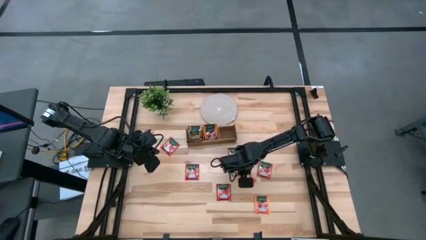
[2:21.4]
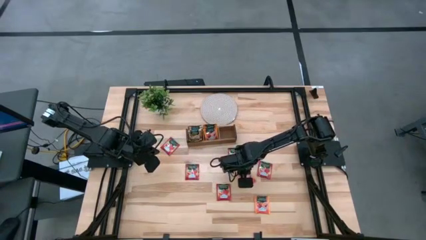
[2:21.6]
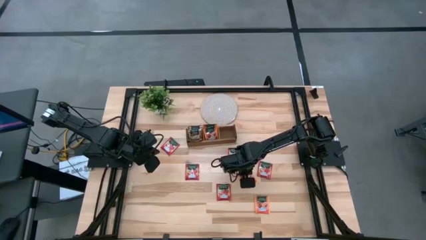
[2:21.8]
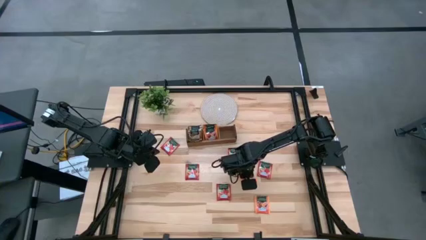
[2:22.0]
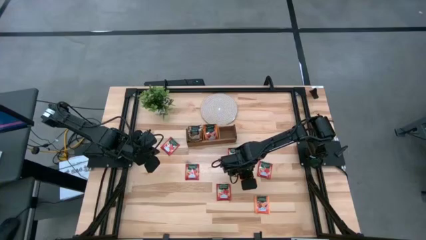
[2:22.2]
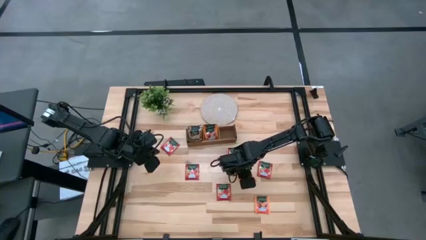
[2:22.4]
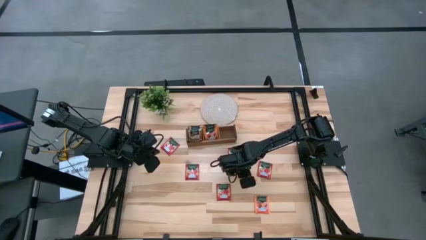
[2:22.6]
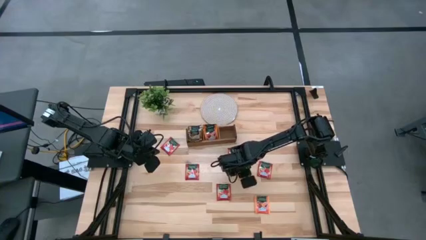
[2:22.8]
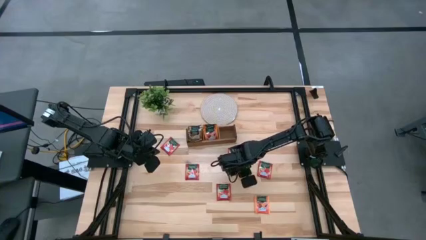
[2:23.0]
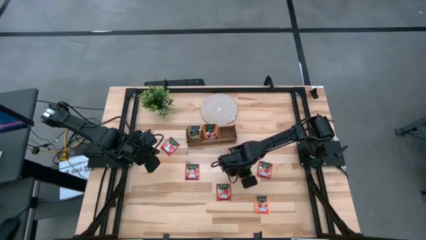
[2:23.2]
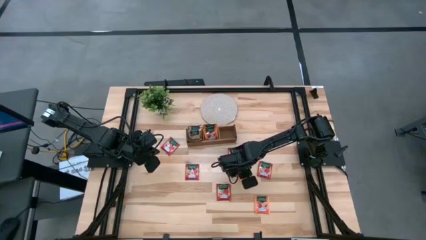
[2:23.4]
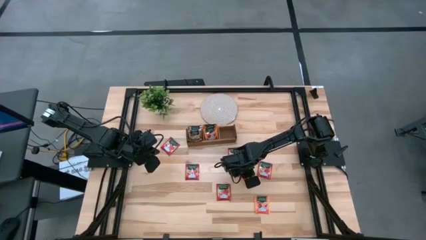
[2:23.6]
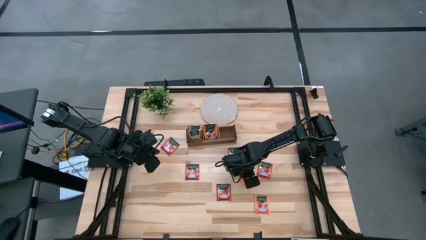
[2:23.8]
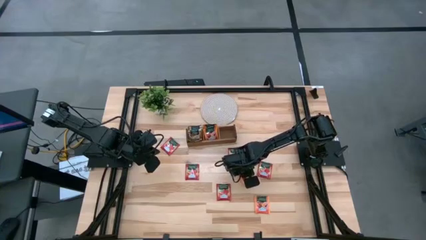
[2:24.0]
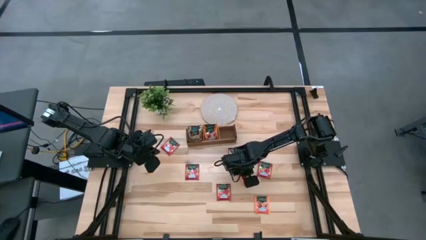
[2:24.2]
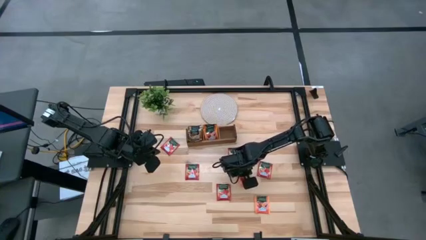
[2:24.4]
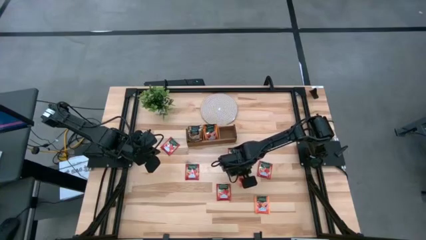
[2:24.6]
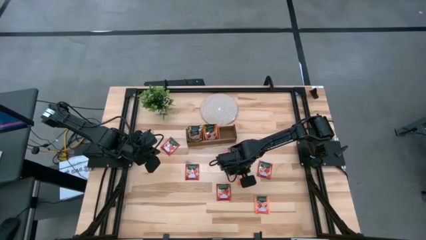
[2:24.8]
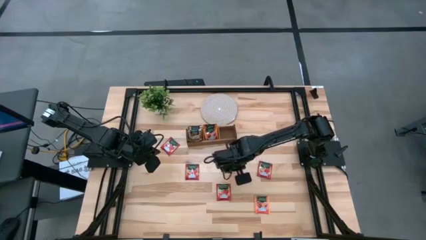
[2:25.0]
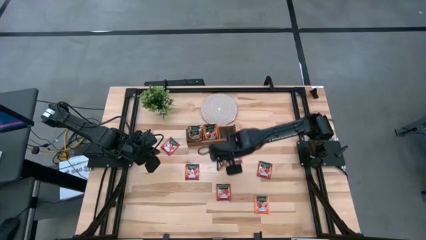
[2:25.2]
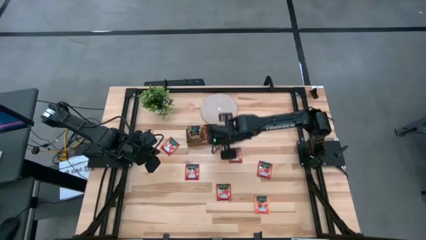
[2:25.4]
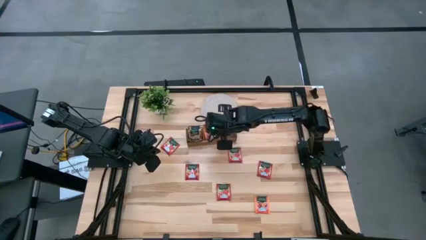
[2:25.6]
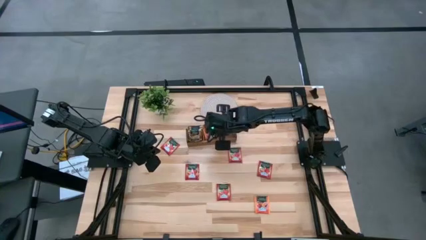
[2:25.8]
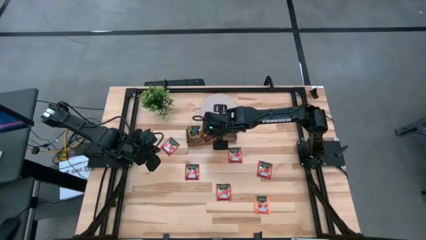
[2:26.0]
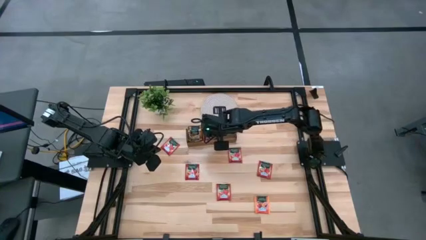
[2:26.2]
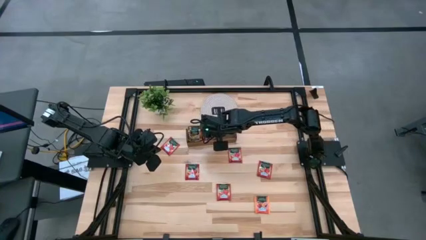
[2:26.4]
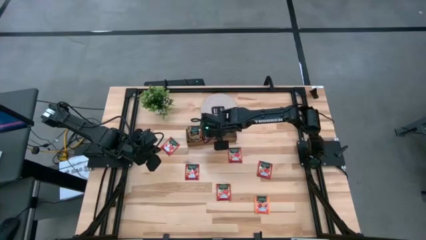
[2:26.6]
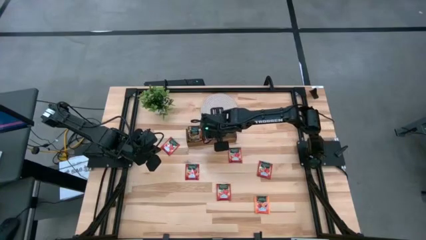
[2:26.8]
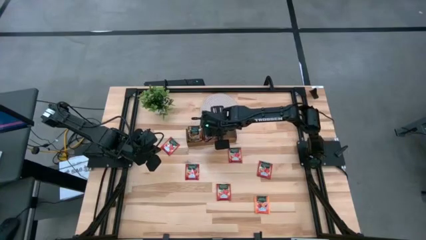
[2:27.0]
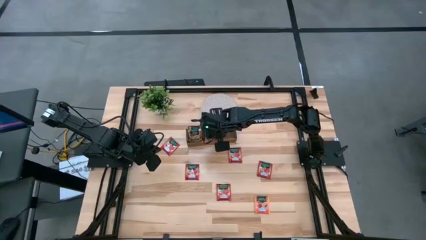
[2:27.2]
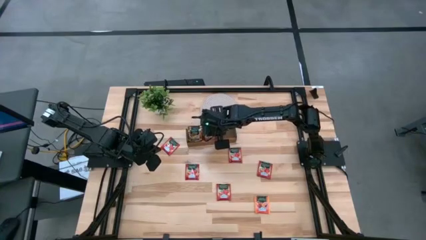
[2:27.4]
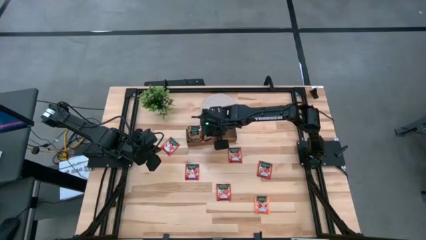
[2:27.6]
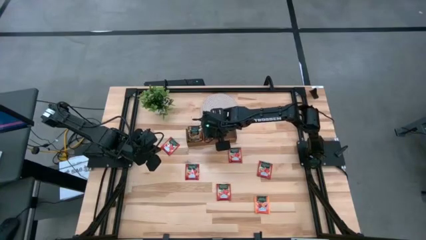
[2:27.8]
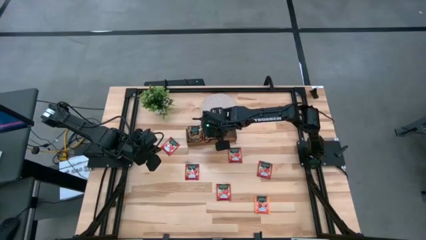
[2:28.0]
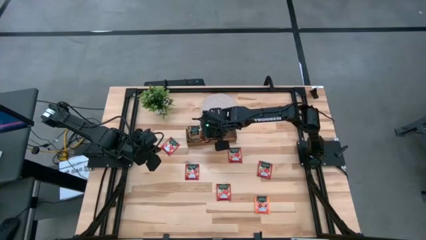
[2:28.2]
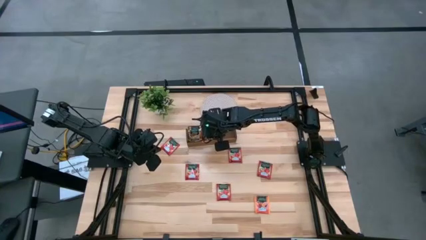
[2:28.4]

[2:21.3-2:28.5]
Task: Pick & Place Tea
Put the orange tea bag into the middle of the wooden organizer

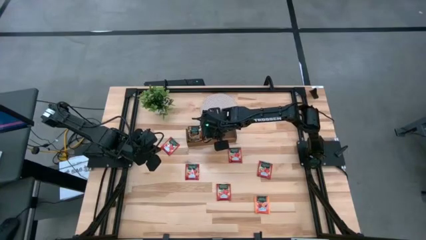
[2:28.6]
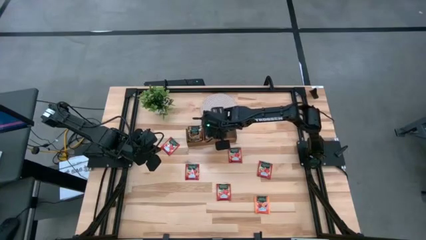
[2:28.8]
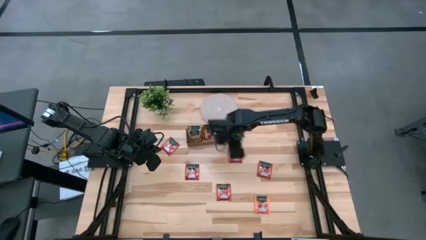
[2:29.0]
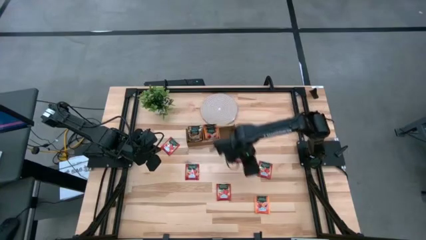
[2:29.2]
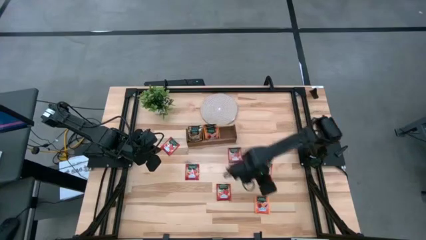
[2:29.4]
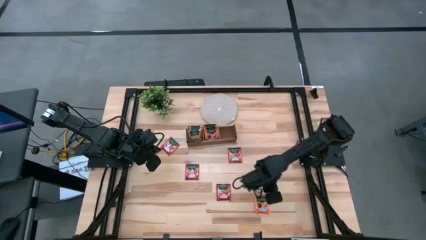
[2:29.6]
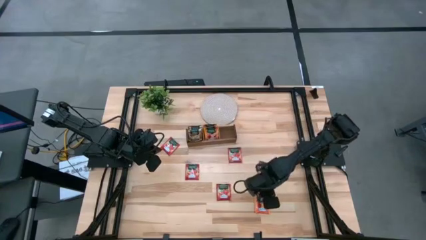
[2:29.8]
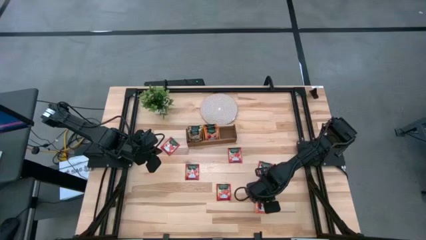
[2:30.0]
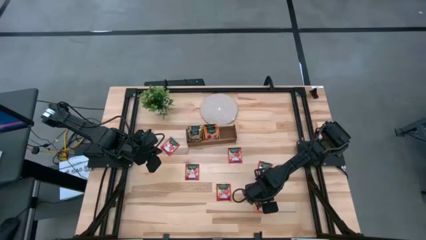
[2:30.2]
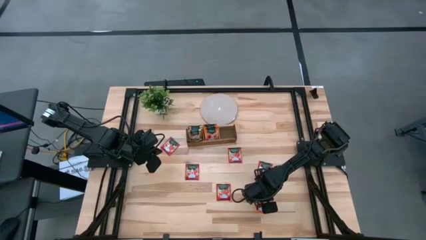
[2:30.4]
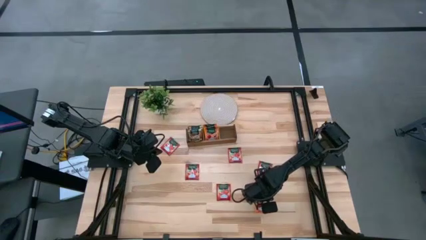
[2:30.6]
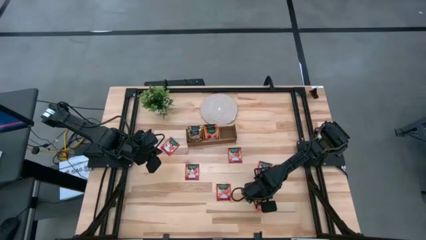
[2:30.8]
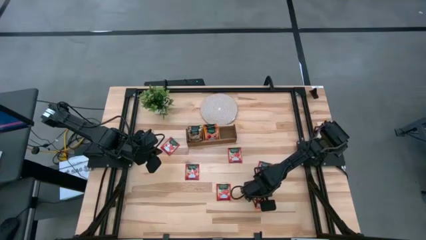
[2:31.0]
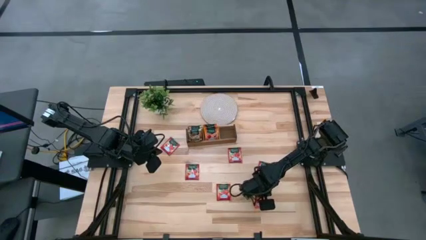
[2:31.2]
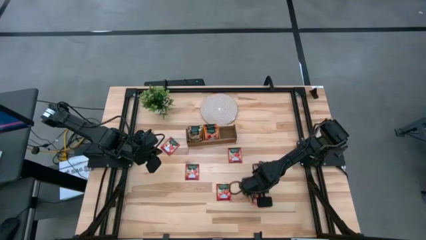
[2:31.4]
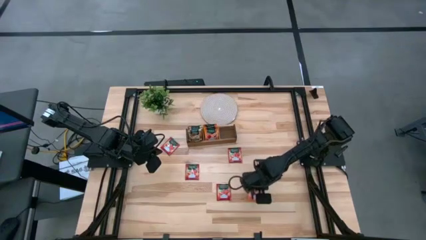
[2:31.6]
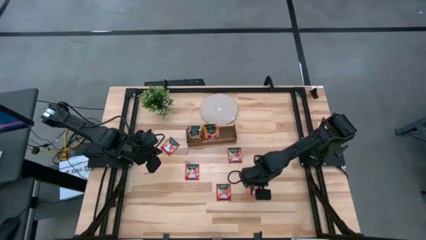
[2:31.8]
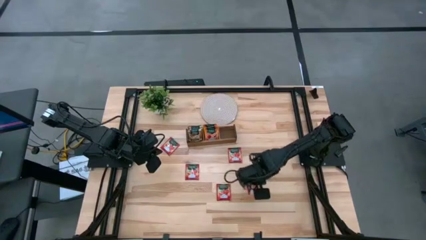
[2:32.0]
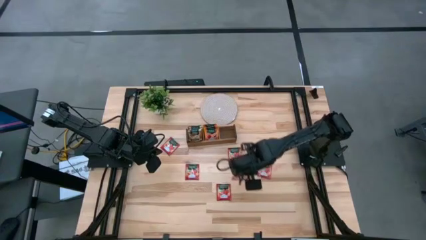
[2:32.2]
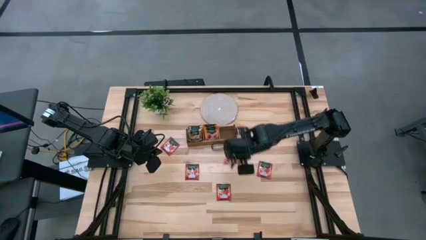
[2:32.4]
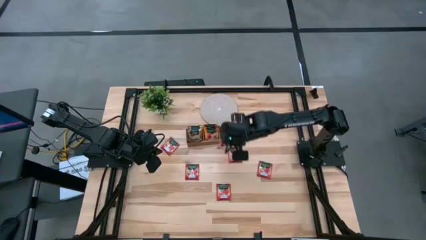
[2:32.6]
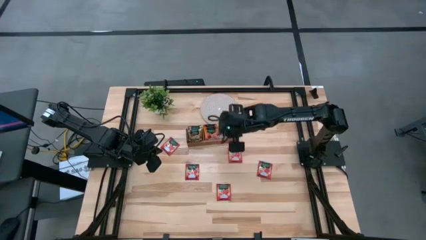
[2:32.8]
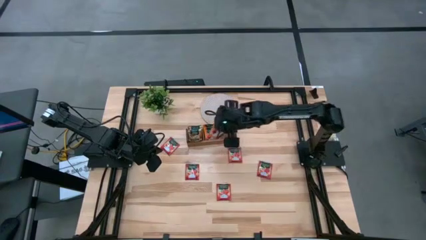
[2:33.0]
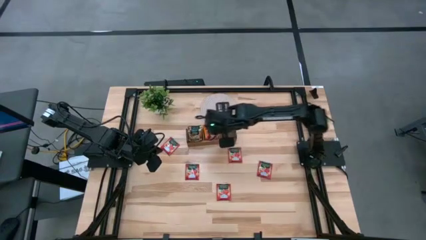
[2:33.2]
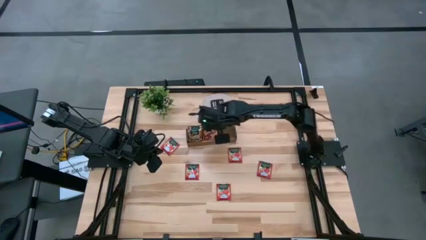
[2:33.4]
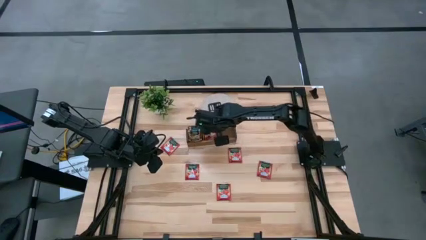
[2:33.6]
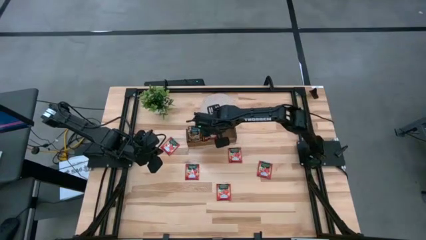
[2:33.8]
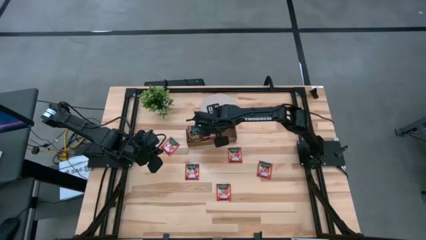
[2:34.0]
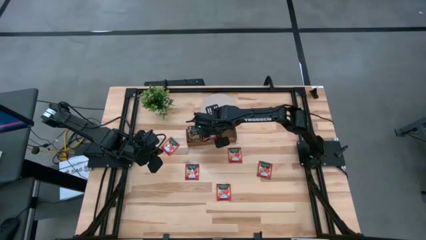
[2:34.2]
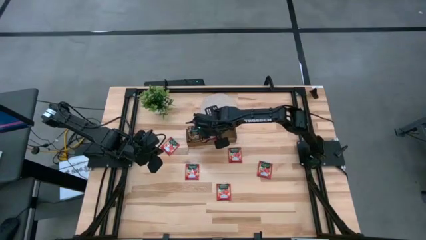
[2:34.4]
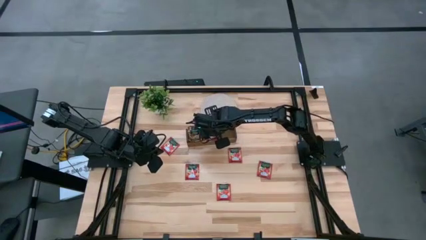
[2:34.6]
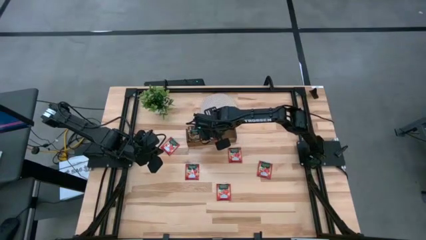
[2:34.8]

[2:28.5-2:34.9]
Put the orange tea bag into the middle of the wooden organizer
